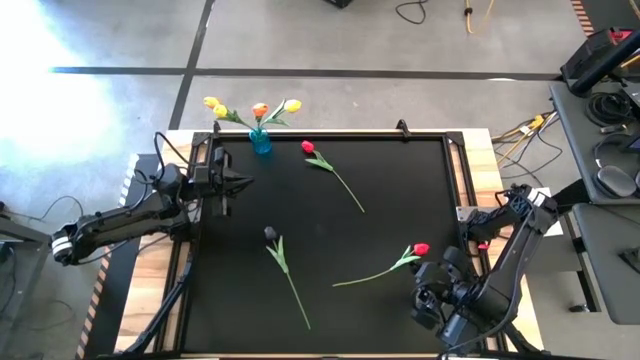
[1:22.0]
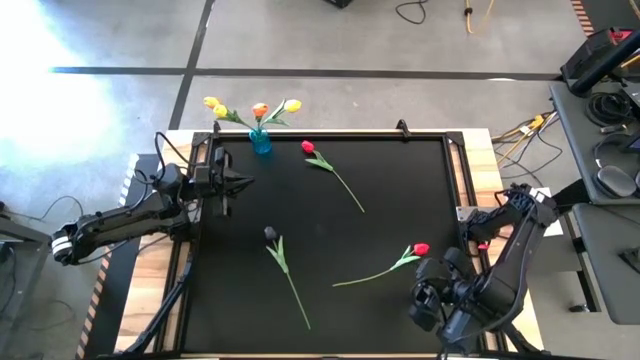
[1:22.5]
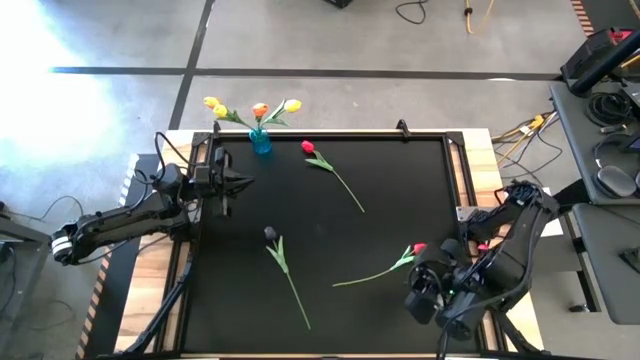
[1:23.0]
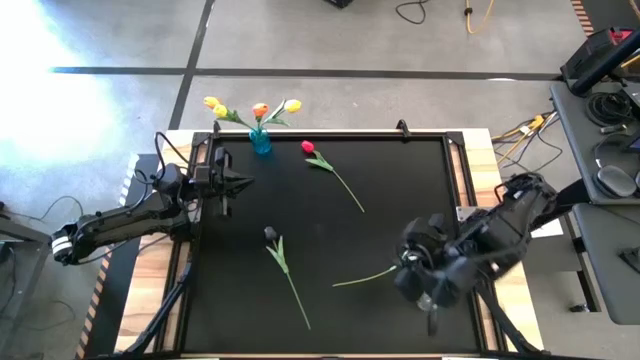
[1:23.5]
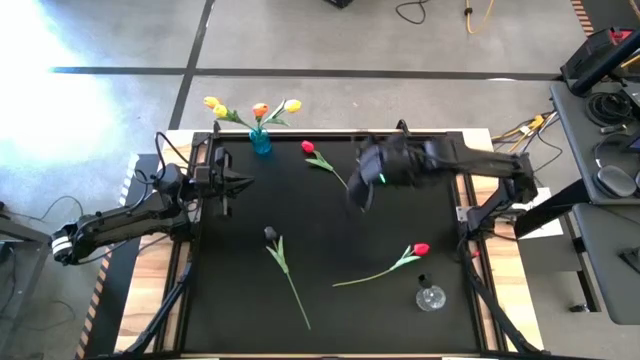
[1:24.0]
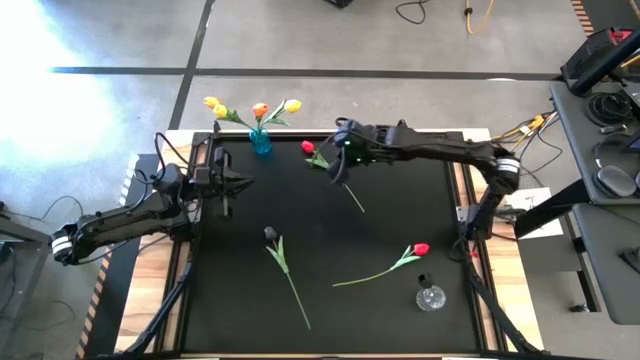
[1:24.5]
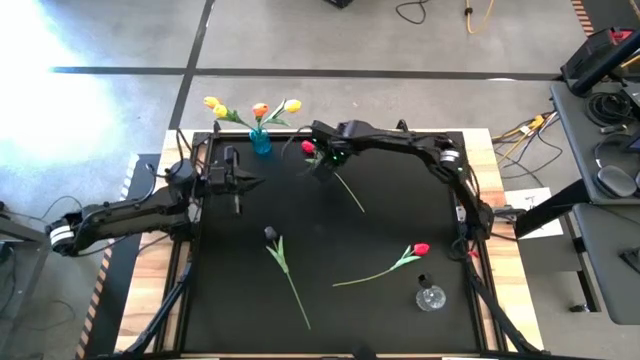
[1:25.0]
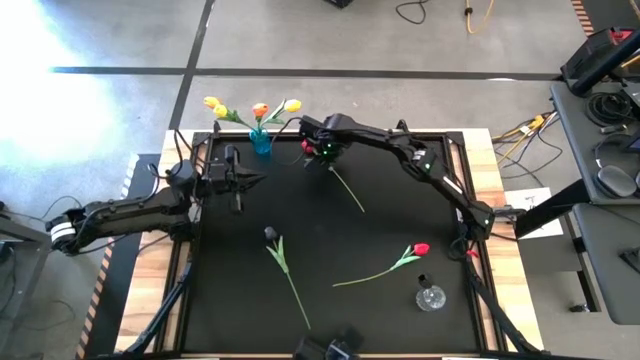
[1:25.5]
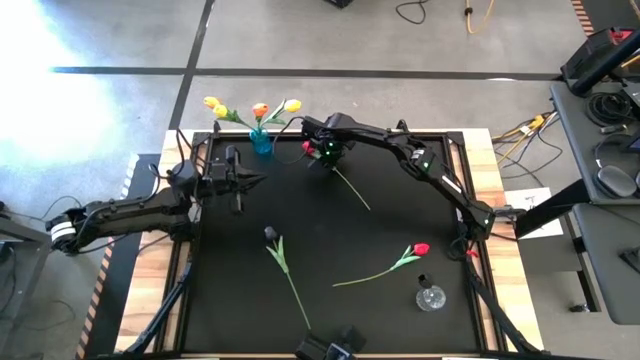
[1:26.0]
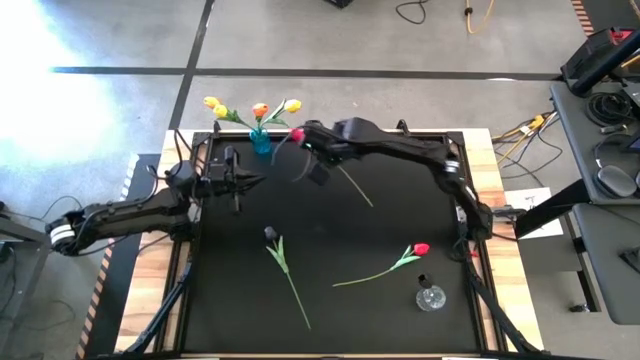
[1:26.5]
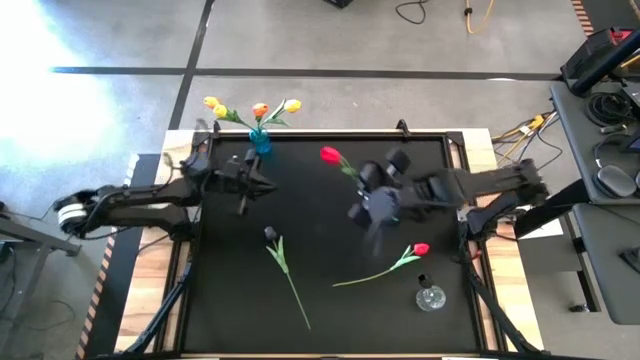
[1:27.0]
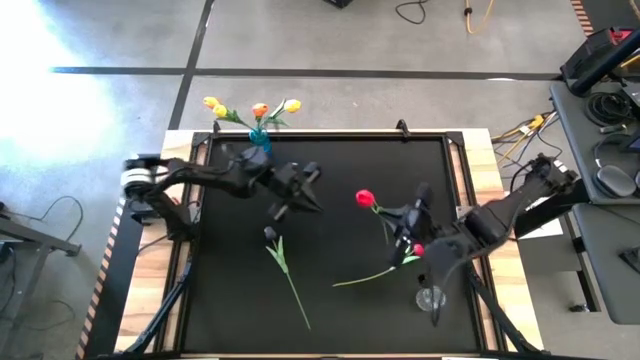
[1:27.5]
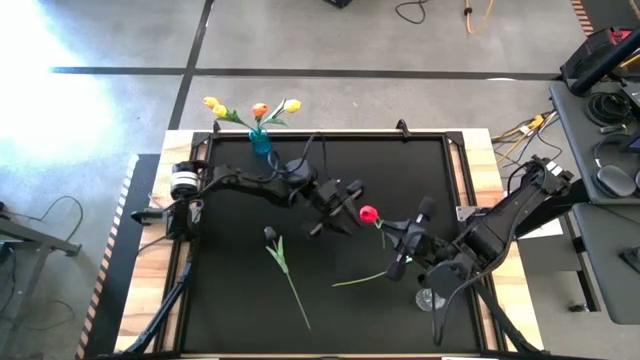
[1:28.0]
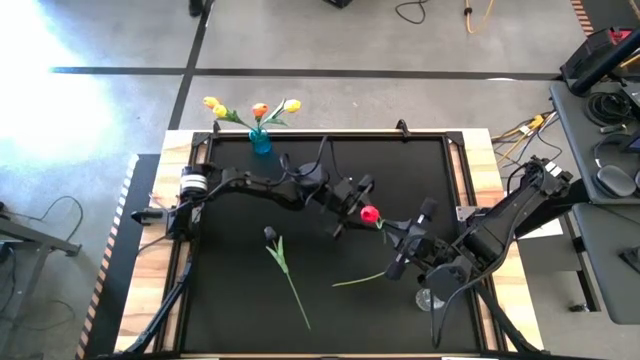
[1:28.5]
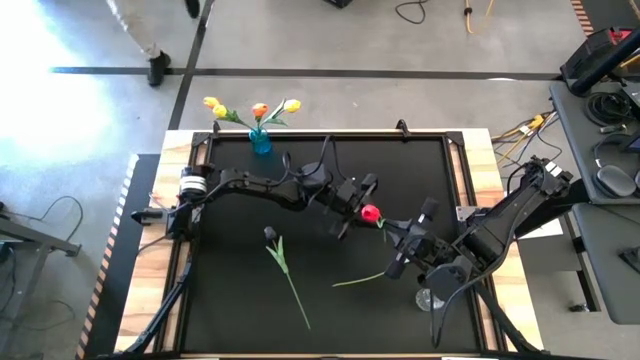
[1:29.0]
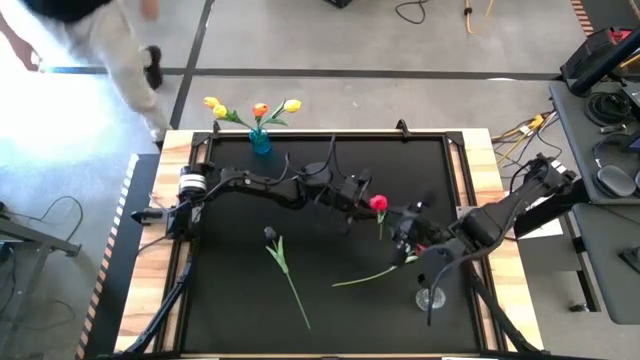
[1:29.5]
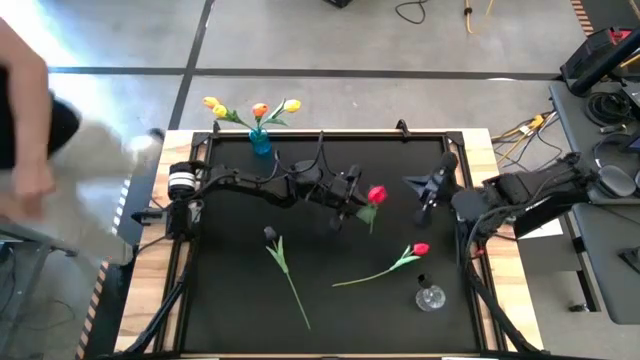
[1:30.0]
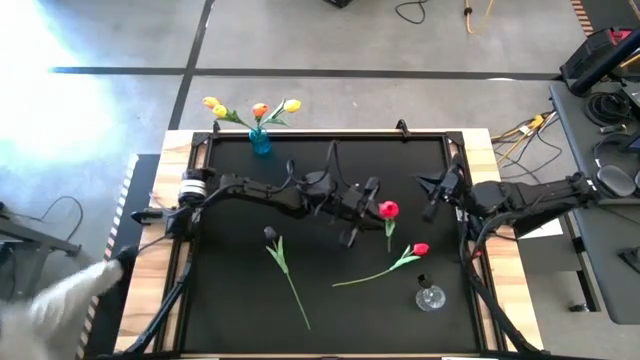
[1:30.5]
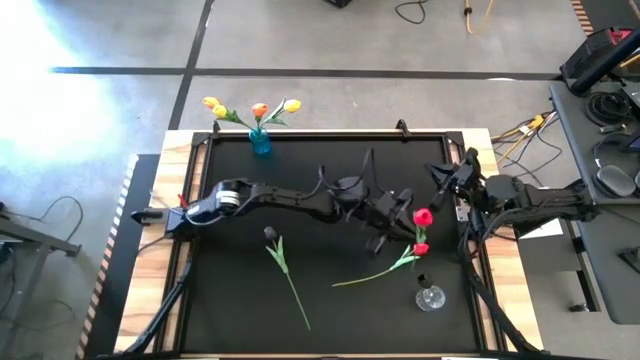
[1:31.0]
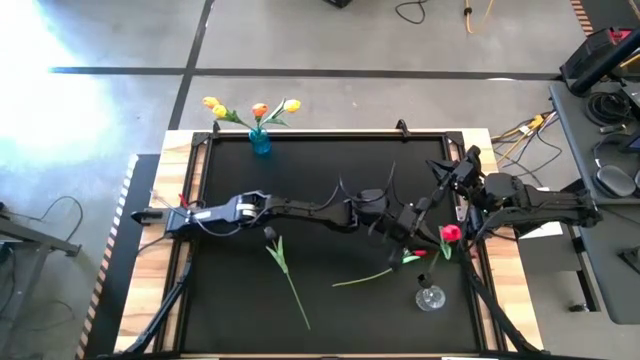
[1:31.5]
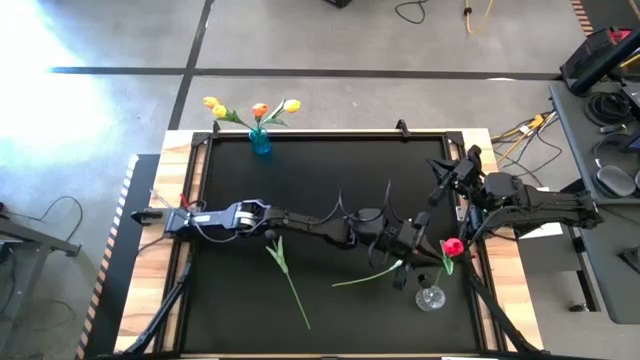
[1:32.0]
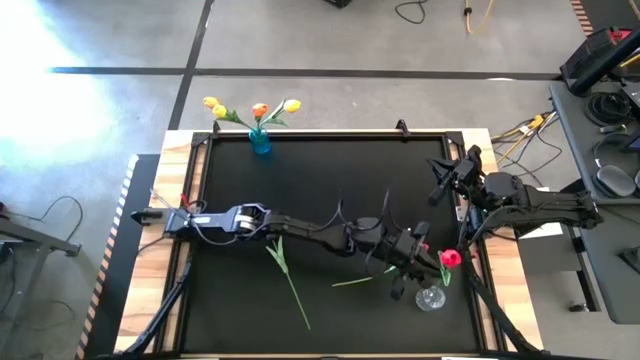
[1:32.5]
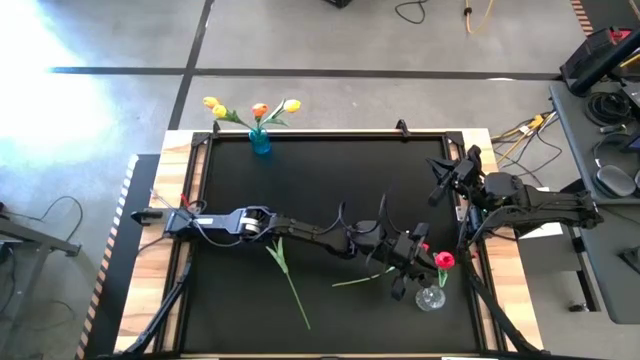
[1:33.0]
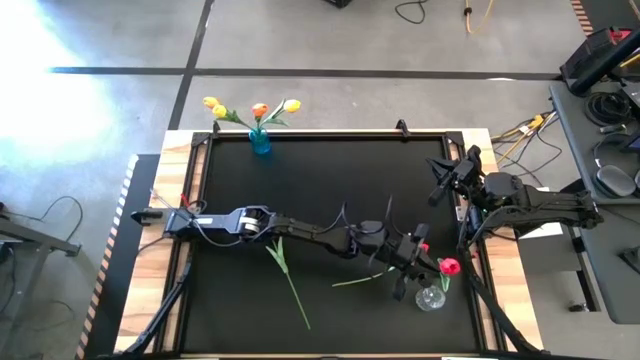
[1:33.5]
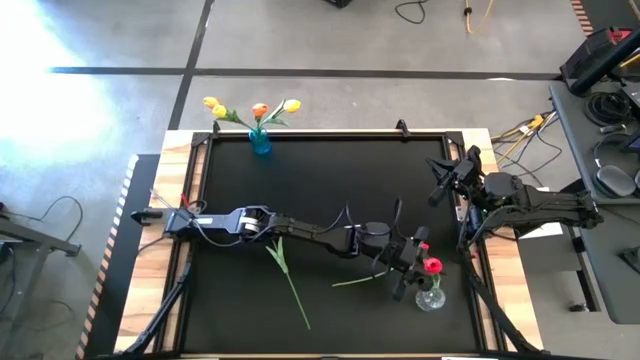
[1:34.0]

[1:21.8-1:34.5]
Task: Sort flowers into vase by color
Put the top red flower into the transparent vase

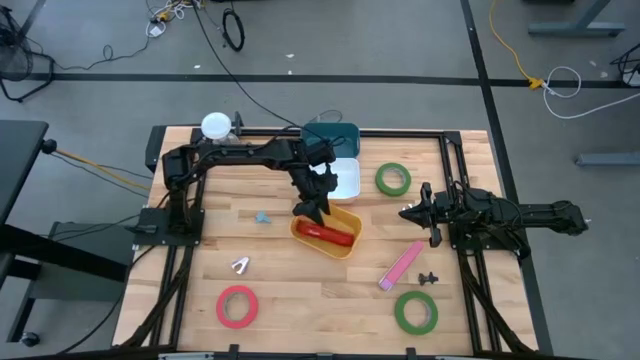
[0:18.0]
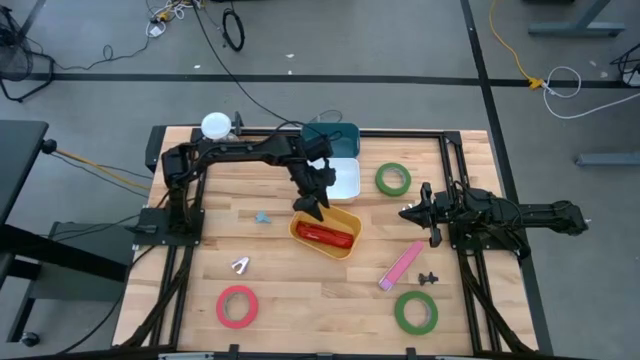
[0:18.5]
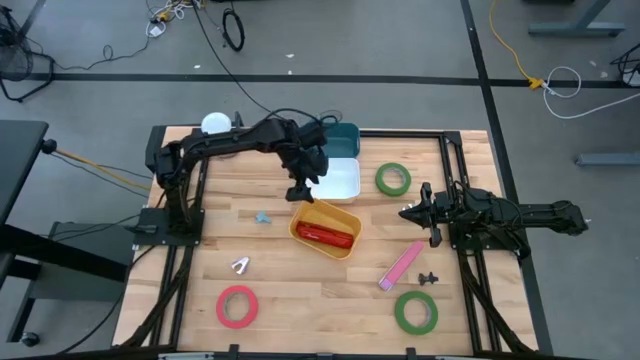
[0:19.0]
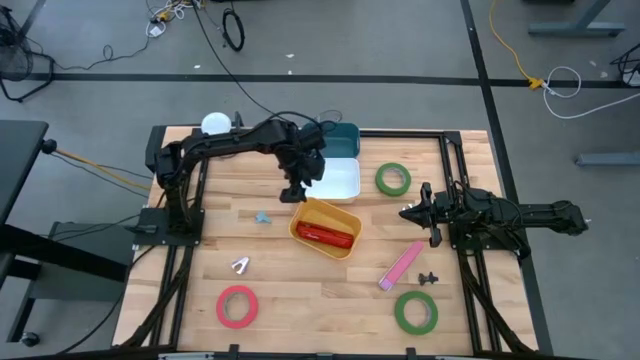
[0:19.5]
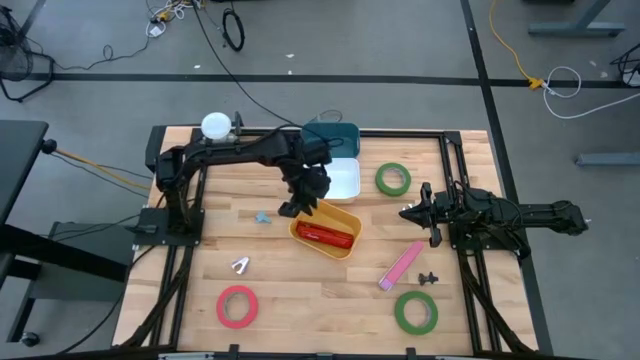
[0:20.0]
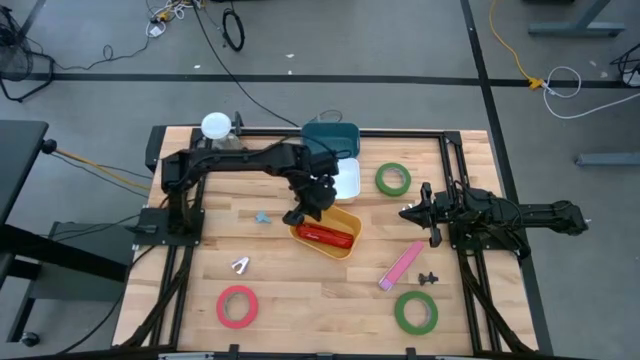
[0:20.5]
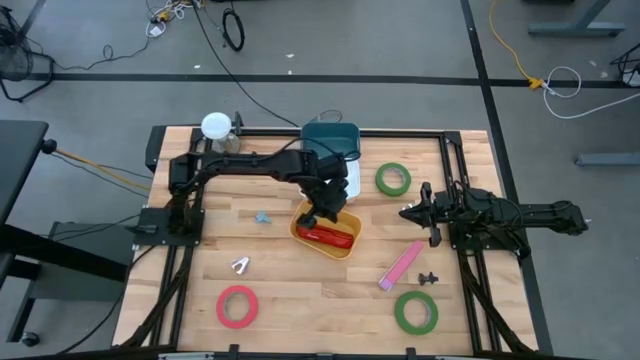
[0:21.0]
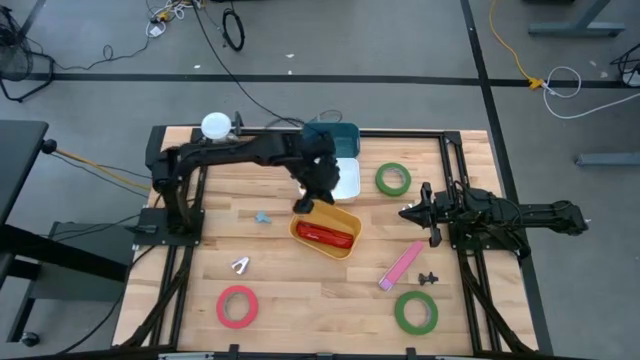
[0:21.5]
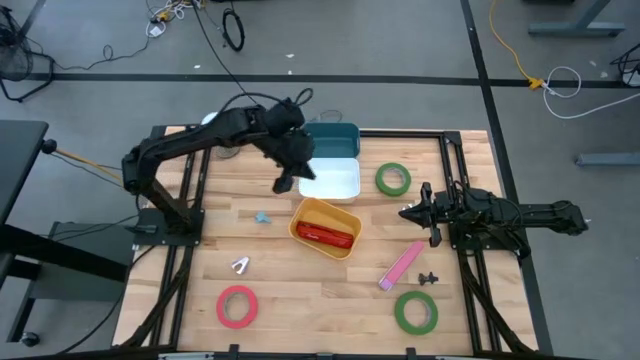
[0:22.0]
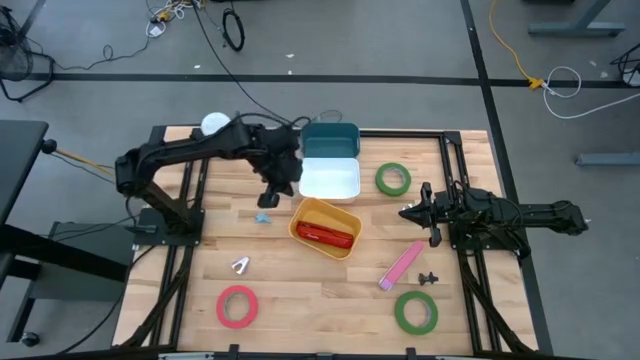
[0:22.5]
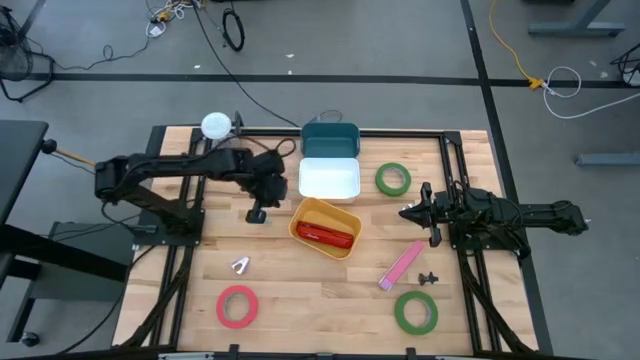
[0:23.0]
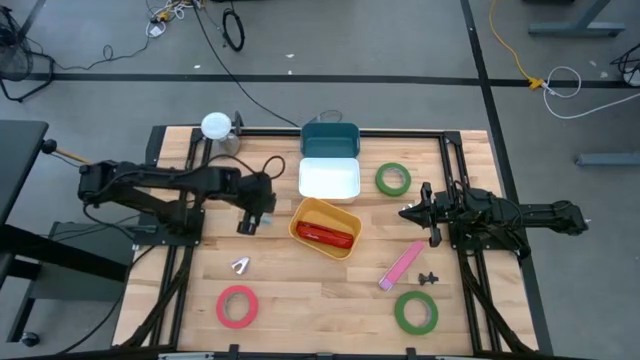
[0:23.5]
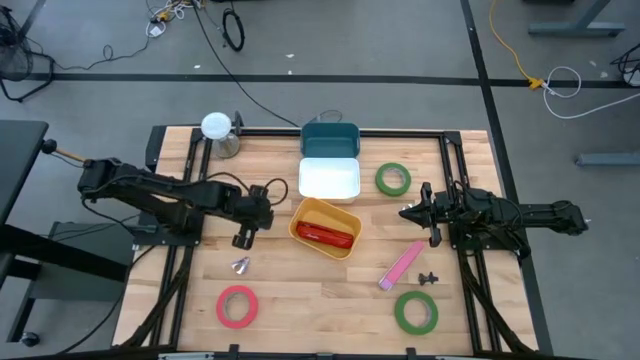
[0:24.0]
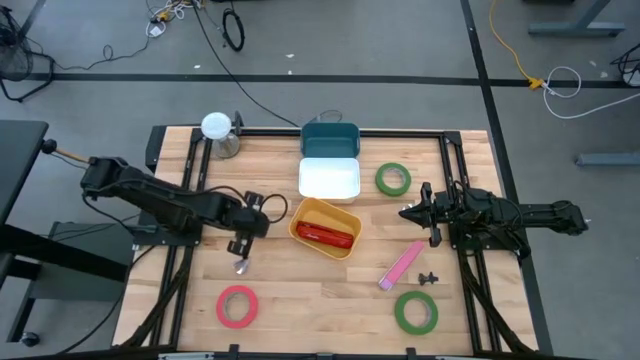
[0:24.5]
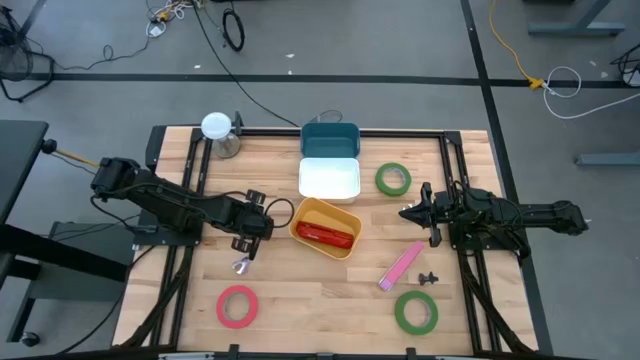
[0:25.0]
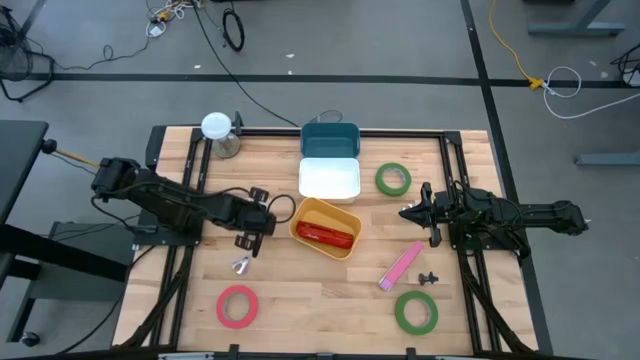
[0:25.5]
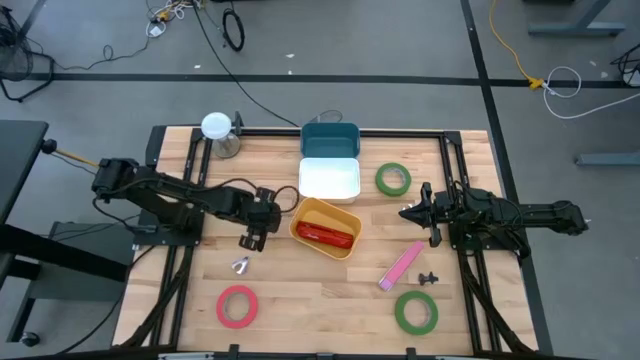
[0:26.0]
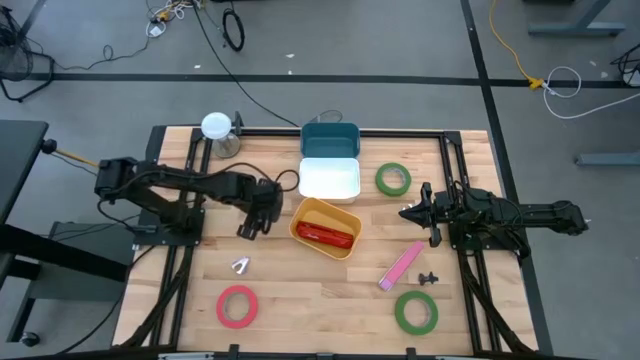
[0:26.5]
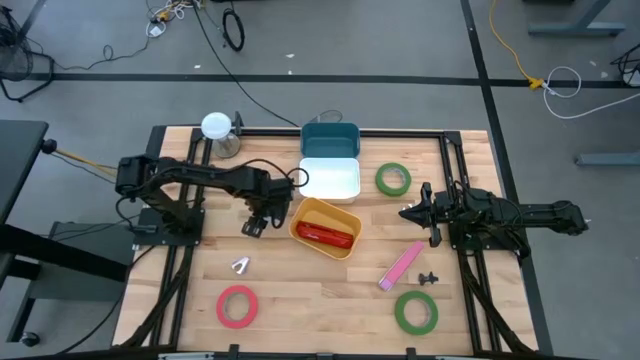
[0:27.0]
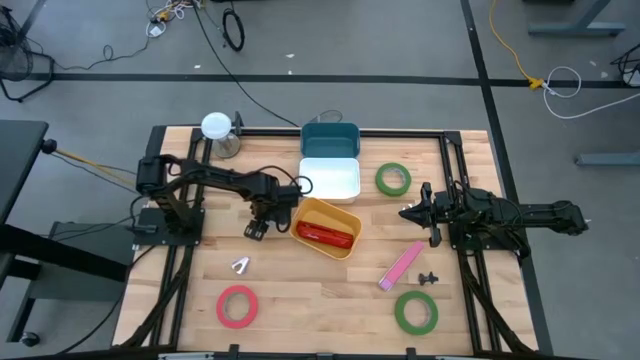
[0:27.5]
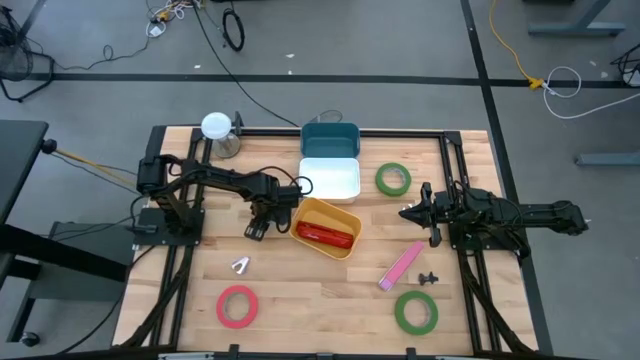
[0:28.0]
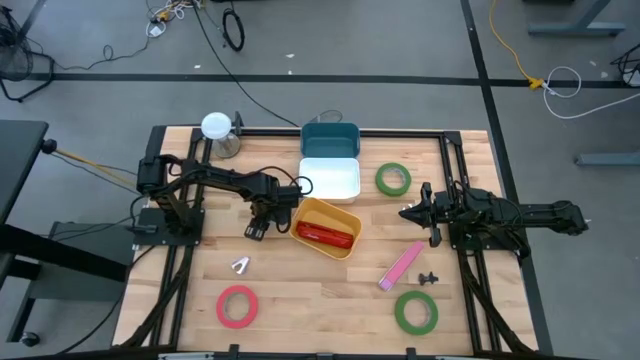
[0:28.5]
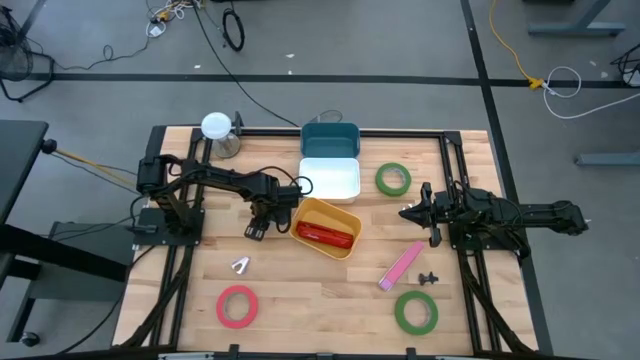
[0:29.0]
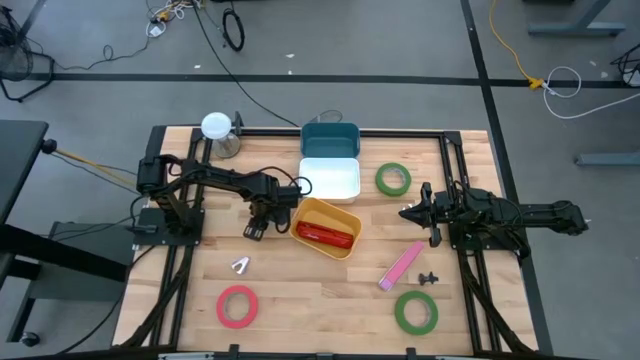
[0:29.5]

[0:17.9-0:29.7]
Task: Pick and place Stapler, Stapler remover, tape
Put the left blue stapler remover into the blue bin
